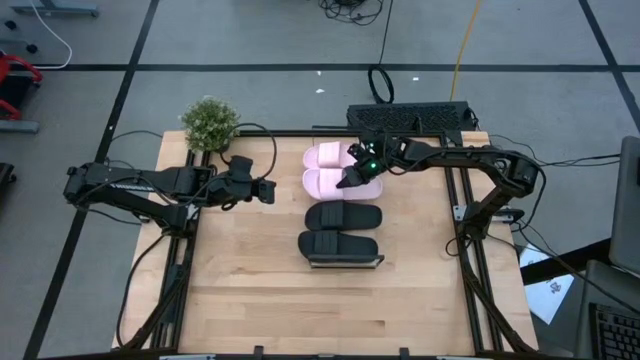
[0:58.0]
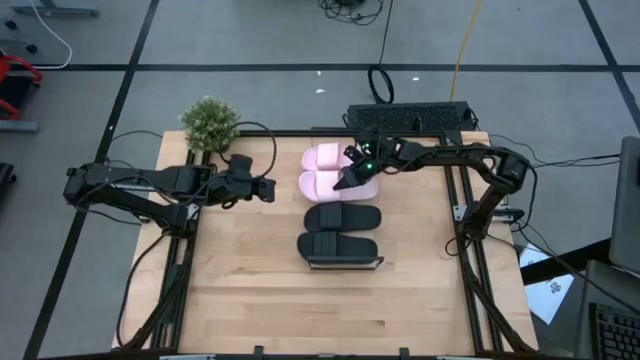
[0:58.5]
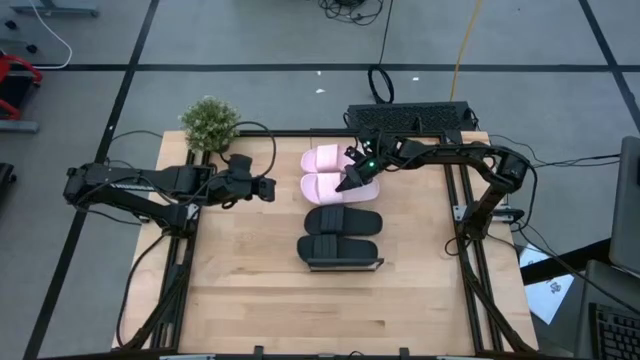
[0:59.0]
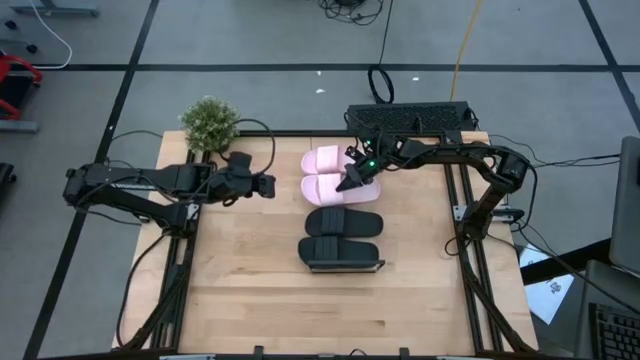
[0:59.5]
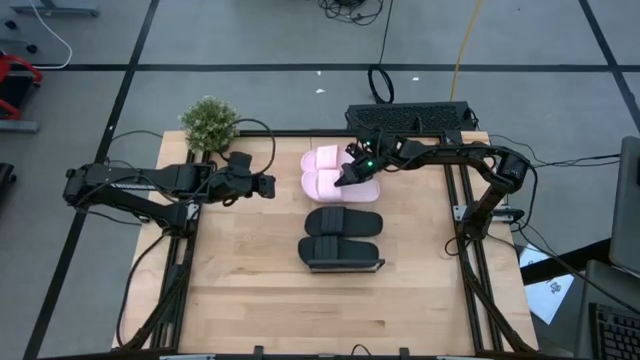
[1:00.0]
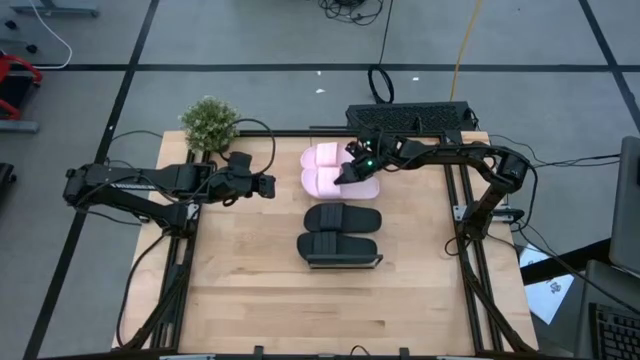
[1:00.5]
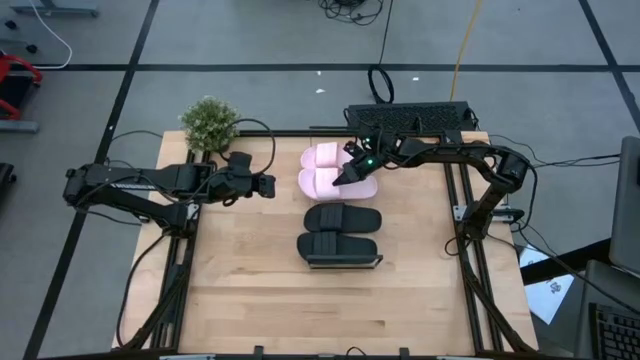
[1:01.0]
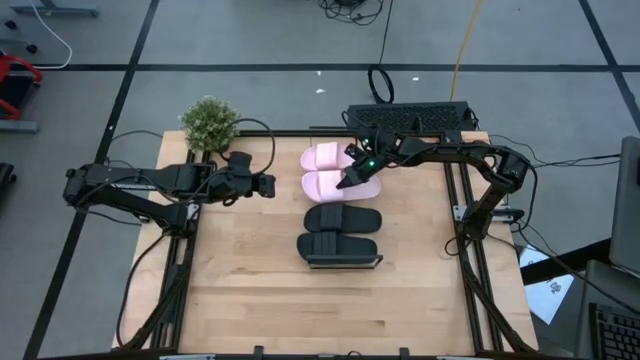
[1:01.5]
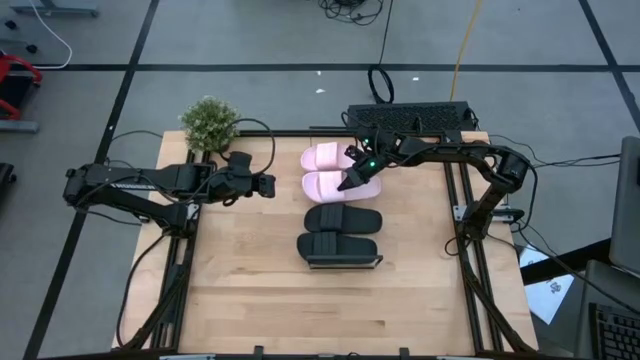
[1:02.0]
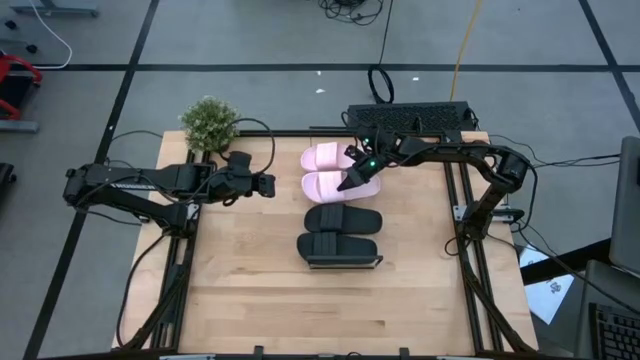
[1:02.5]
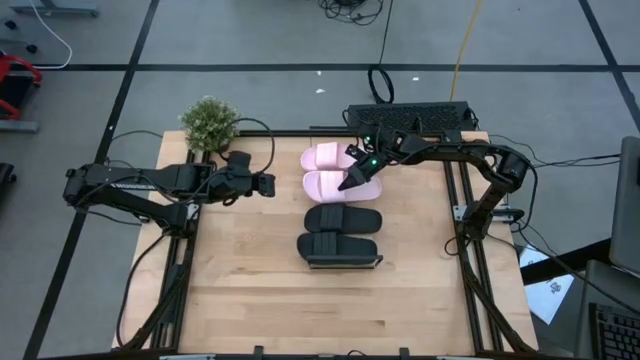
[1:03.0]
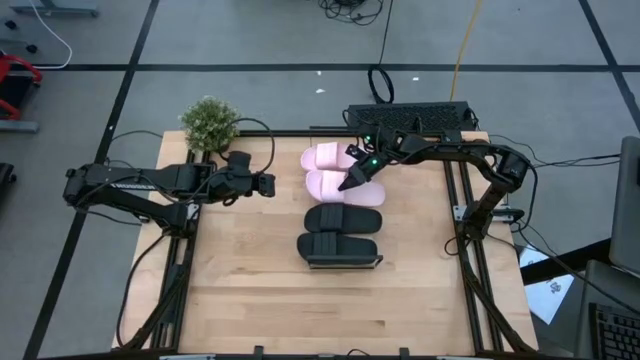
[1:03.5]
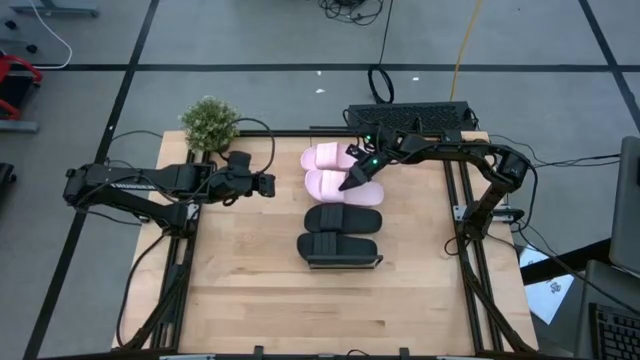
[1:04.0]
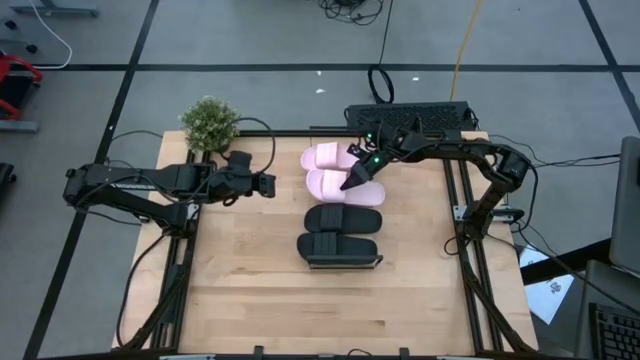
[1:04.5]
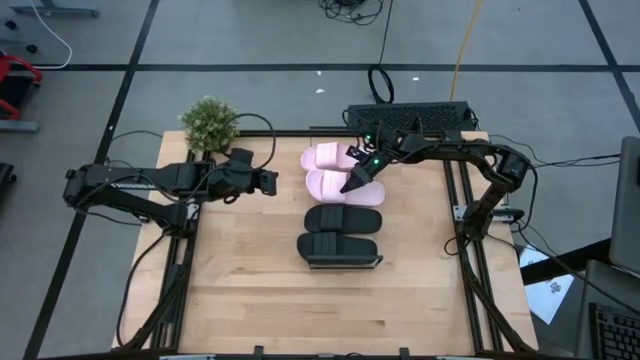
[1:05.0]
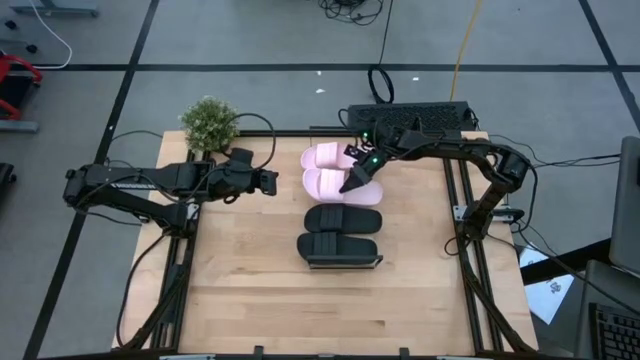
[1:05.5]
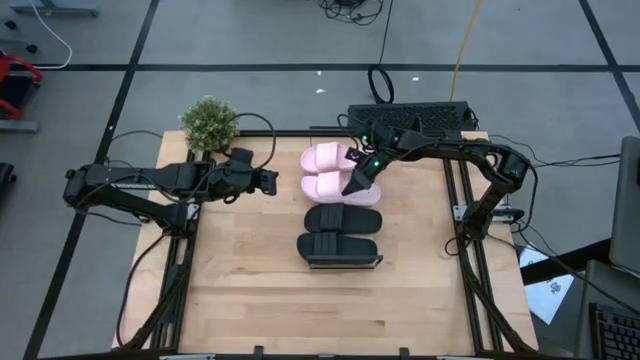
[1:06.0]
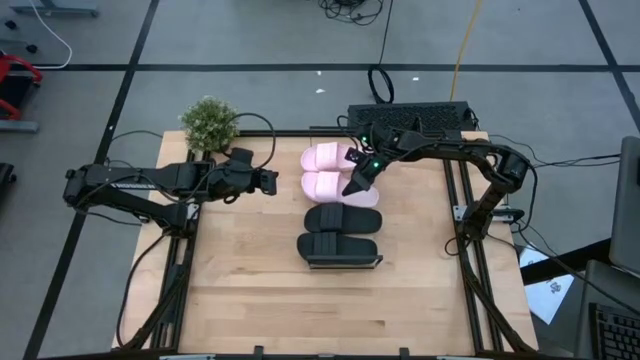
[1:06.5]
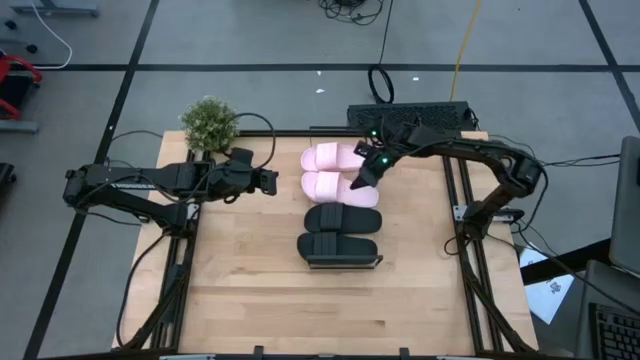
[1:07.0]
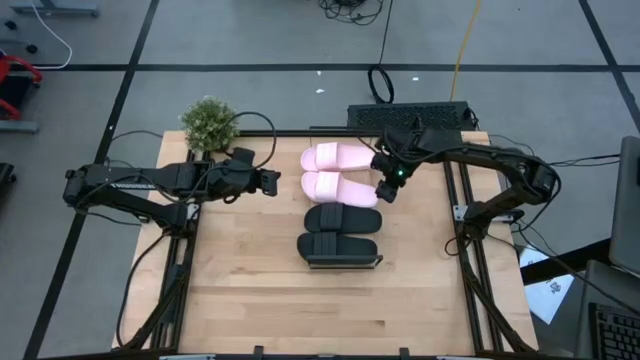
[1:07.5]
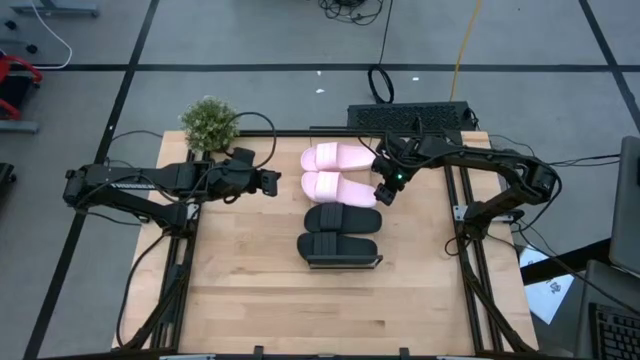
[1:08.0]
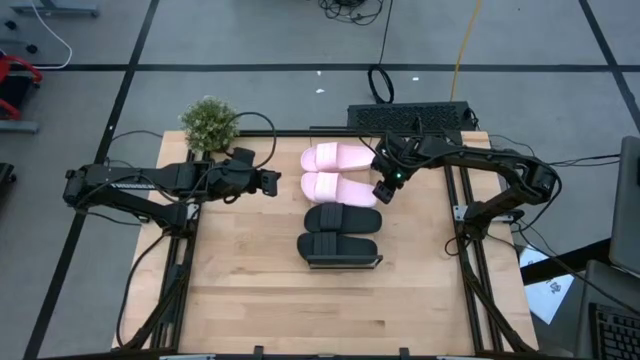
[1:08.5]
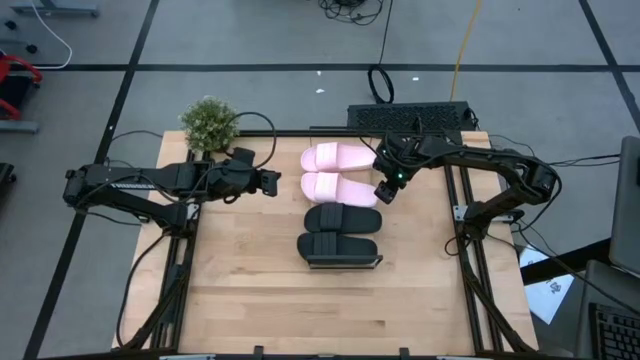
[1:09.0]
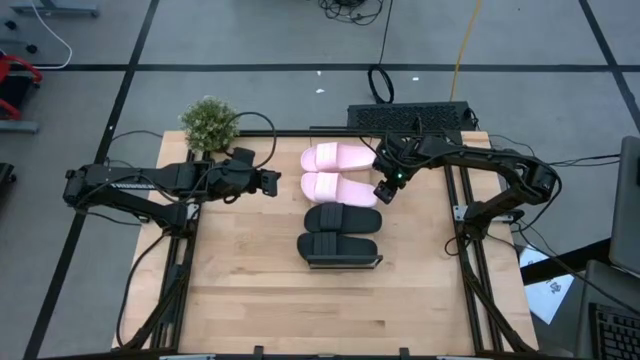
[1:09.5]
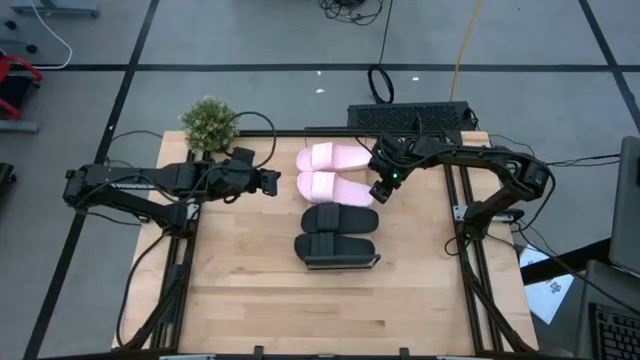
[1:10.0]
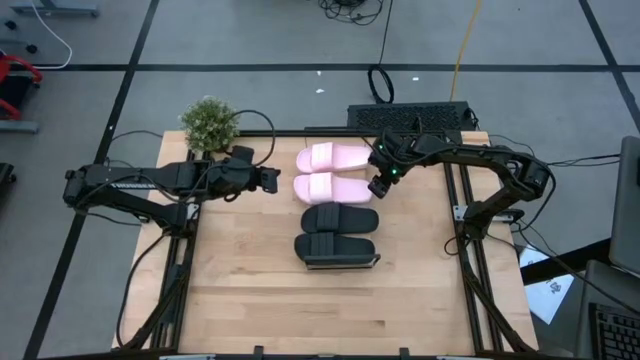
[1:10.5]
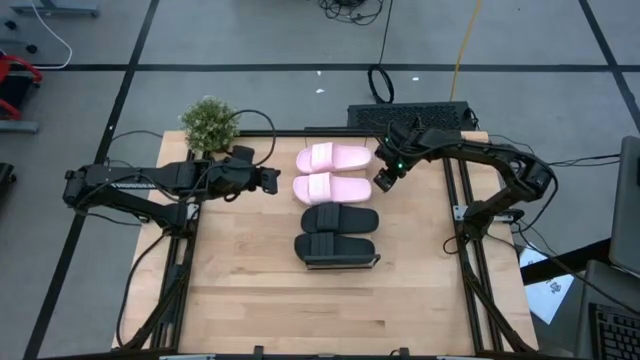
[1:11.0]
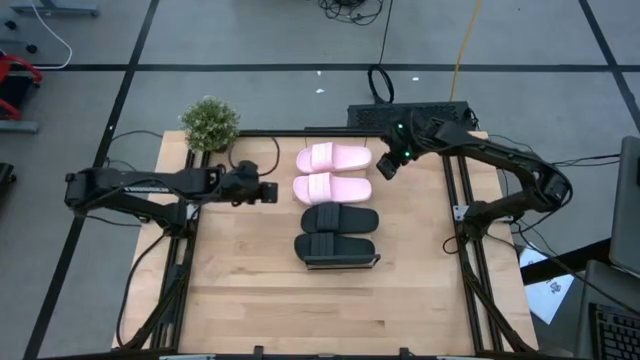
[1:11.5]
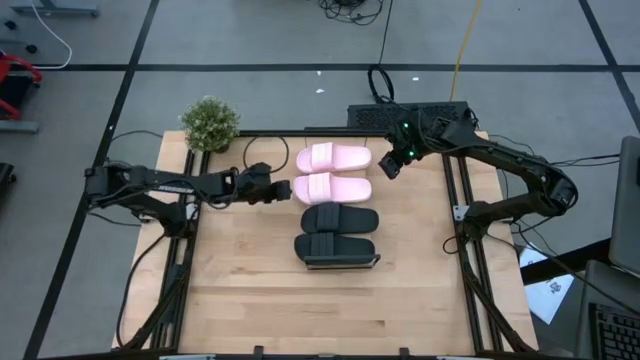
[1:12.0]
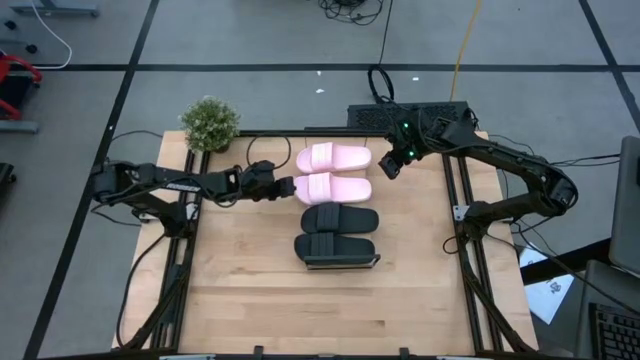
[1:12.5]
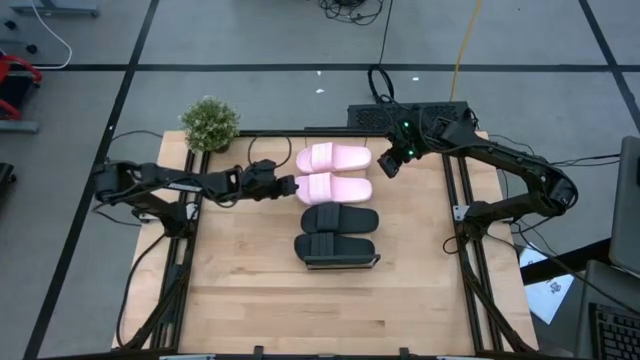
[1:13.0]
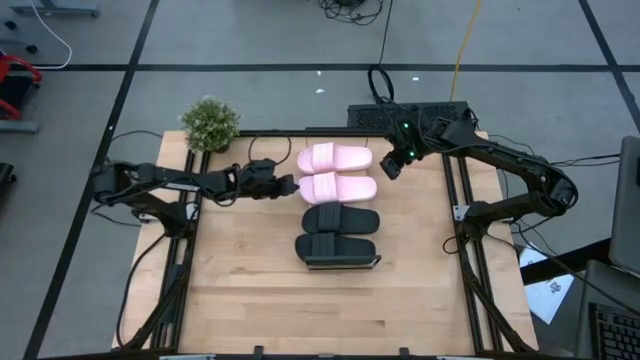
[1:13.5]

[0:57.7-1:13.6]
Task: Pick and place slides into the shelf
Put the pink slipper on the shelf

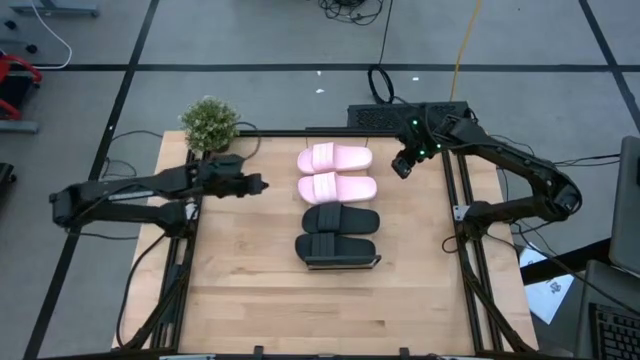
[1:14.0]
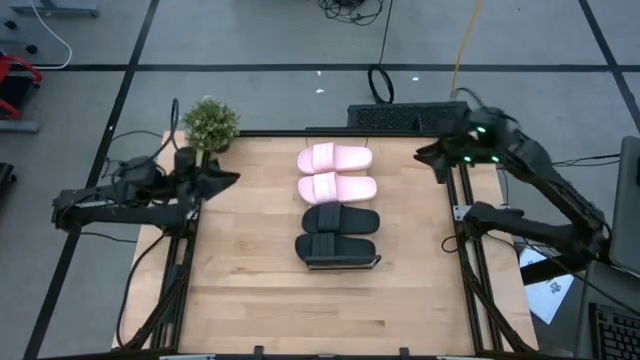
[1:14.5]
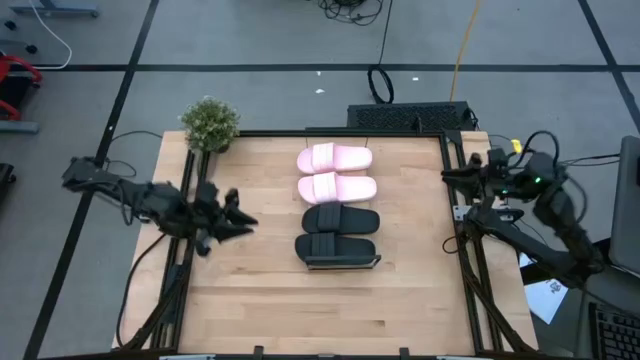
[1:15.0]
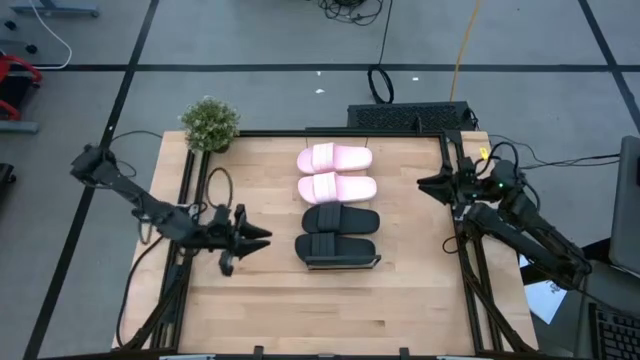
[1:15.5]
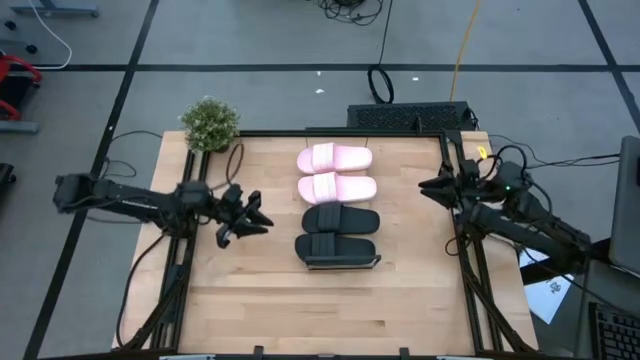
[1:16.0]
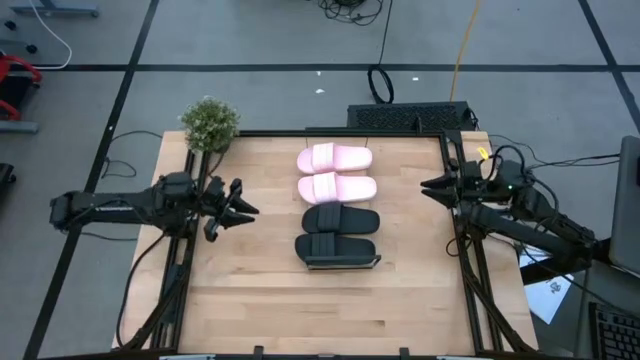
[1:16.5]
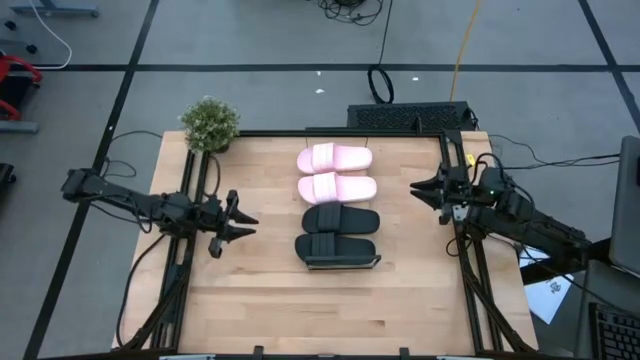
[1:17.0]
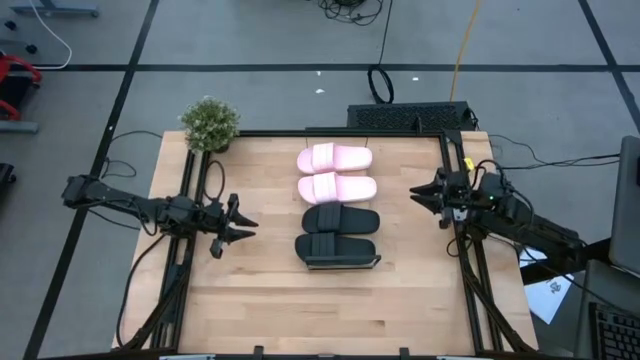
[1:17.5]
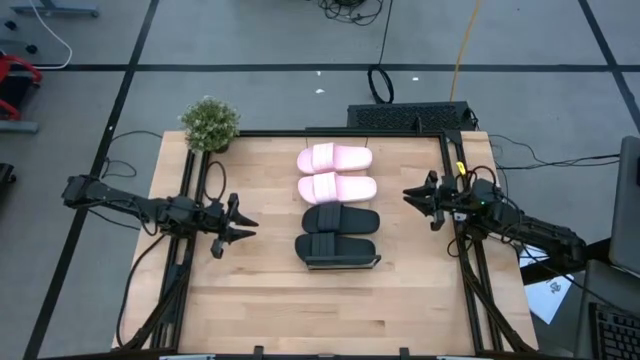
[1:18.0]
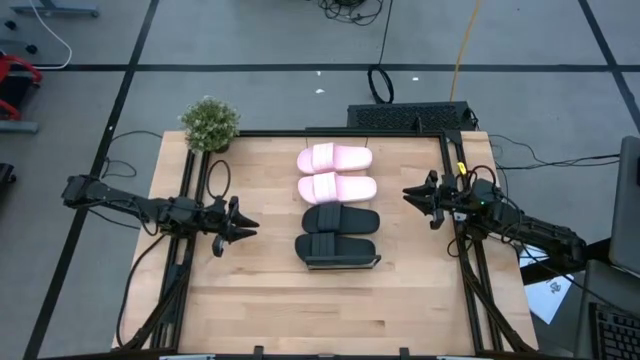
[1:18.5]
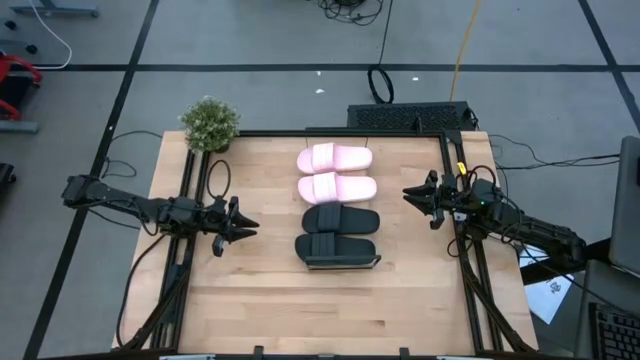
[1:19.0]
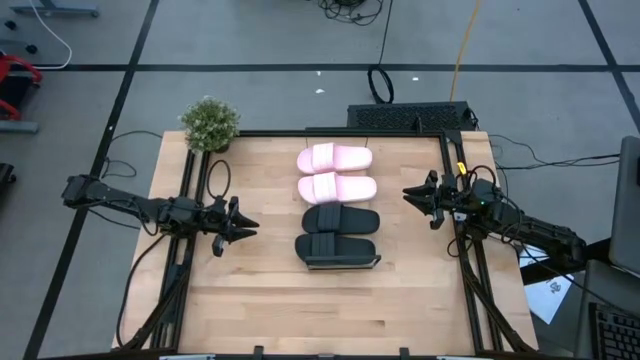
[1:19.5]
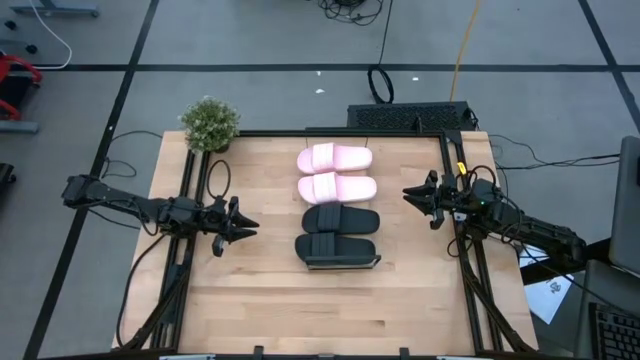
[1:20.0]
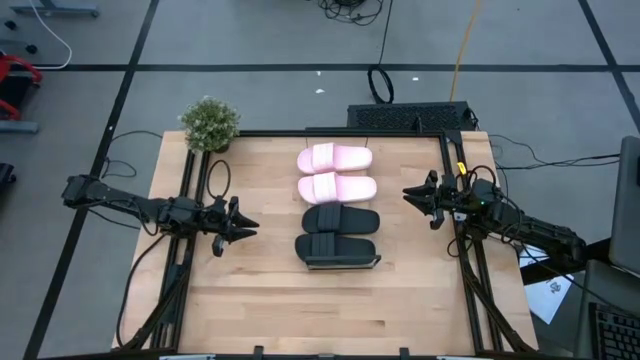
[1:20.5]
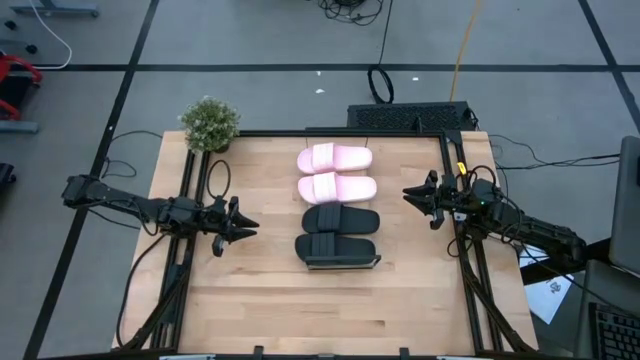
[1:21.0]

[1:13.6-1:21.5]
Return to Home Position
